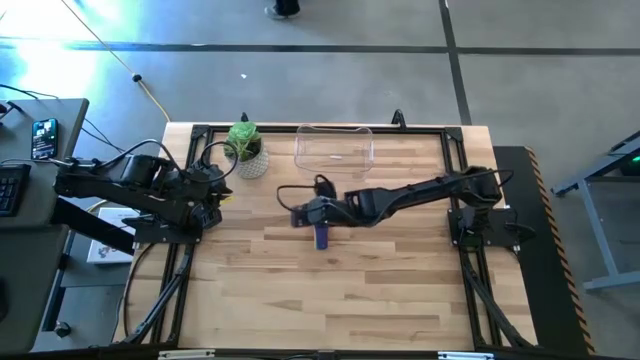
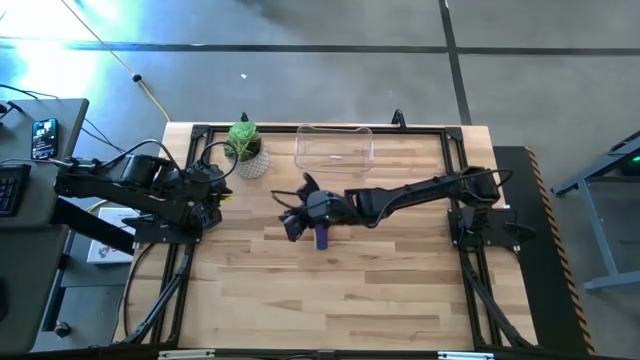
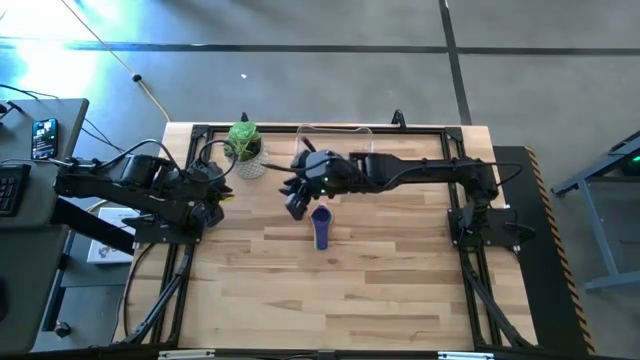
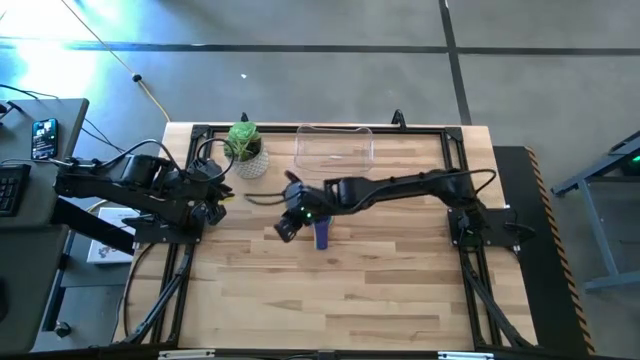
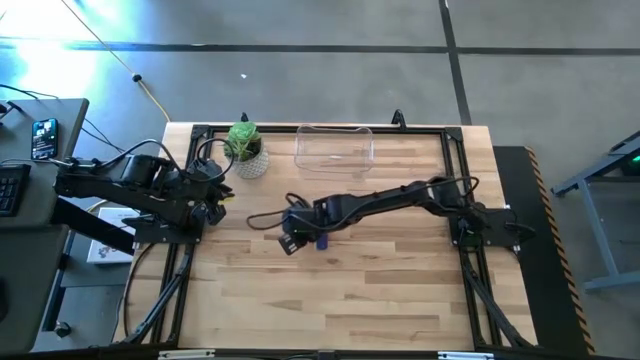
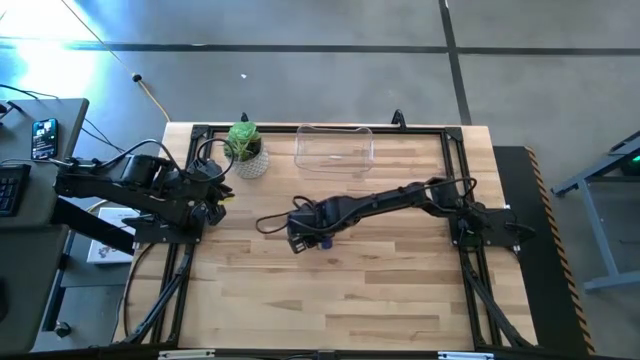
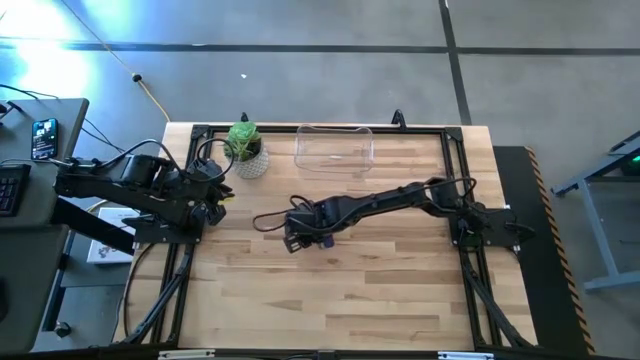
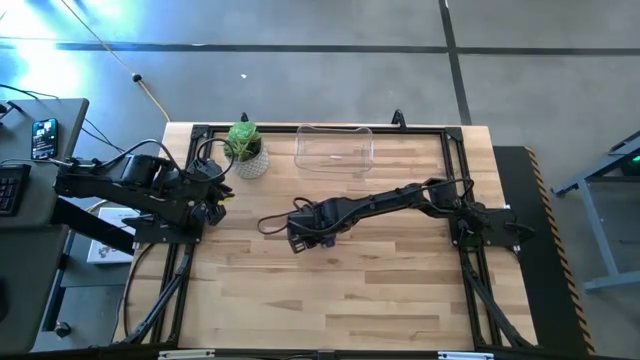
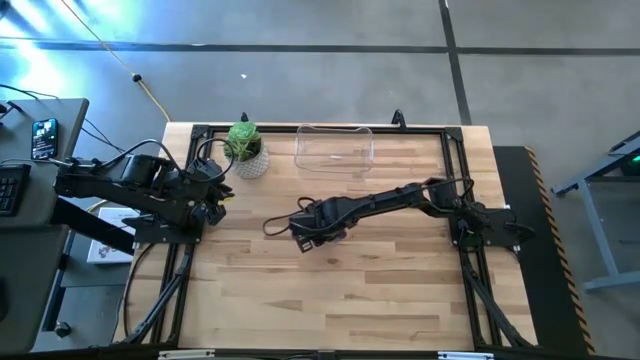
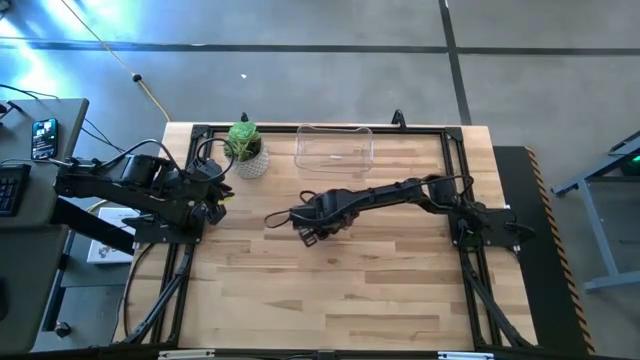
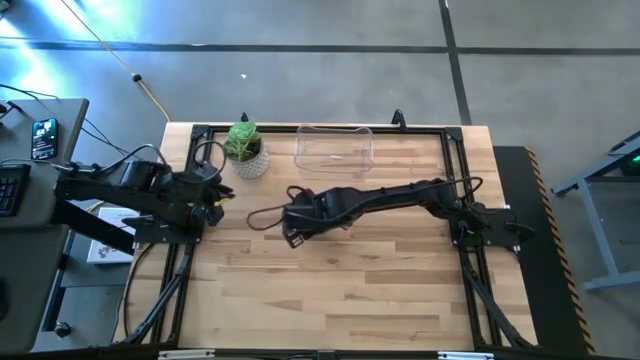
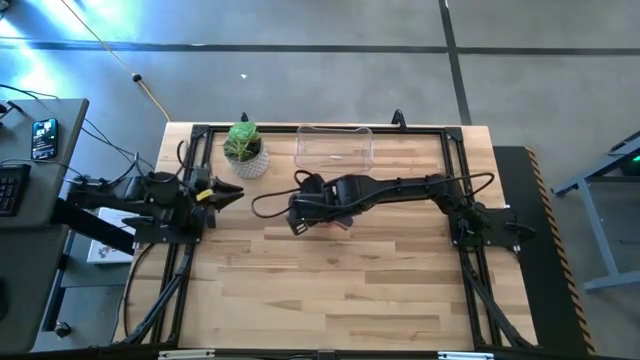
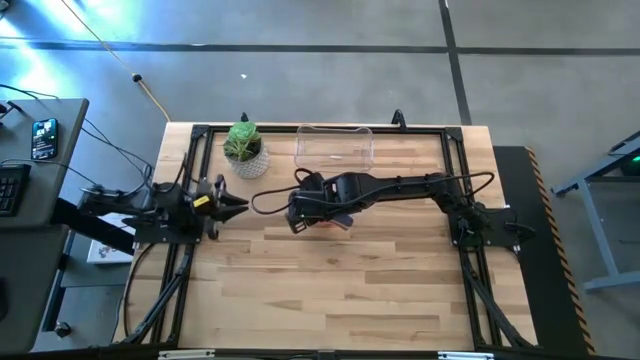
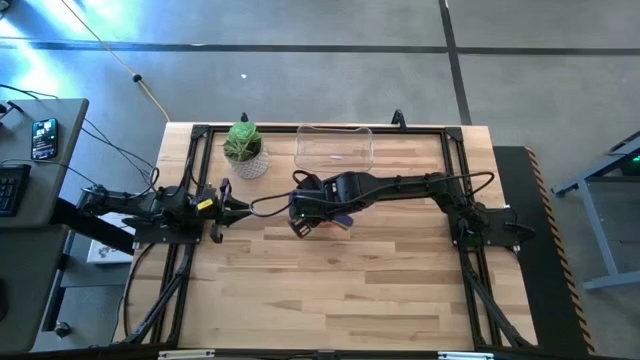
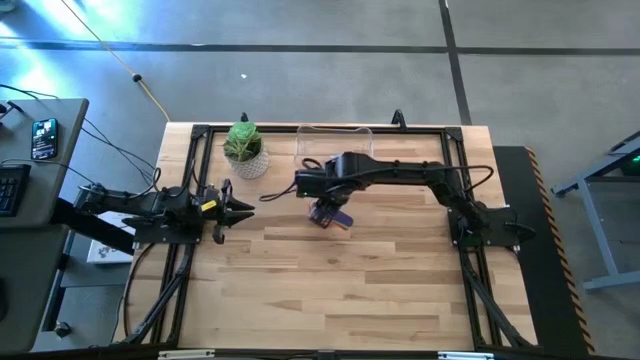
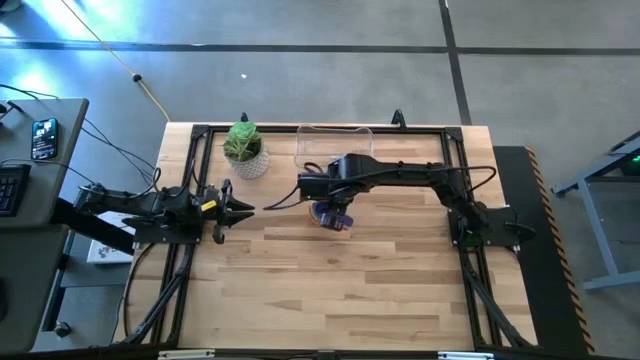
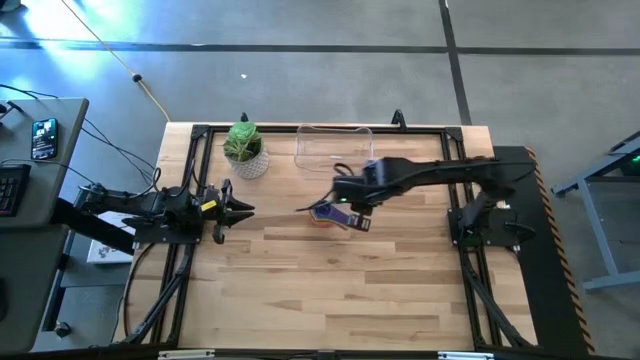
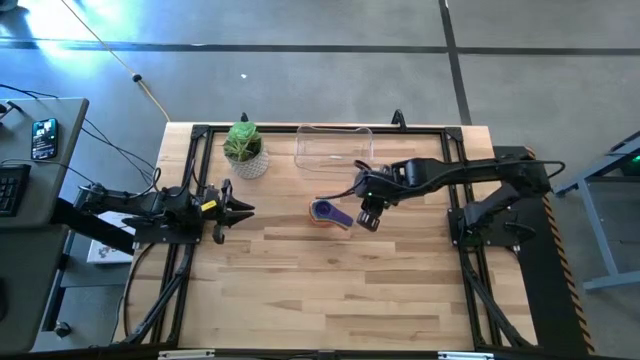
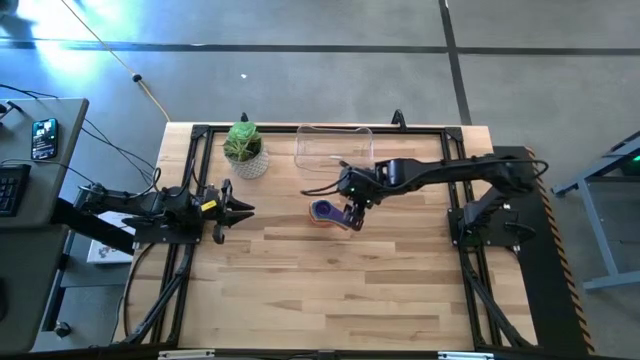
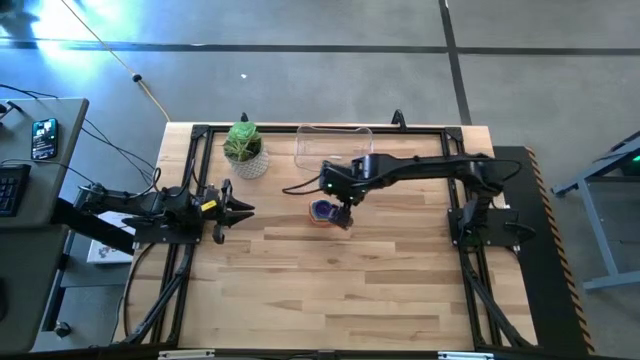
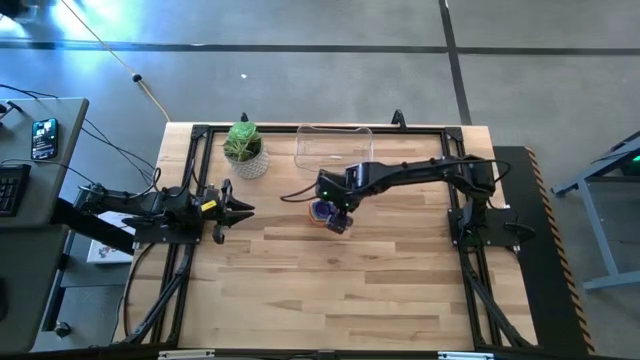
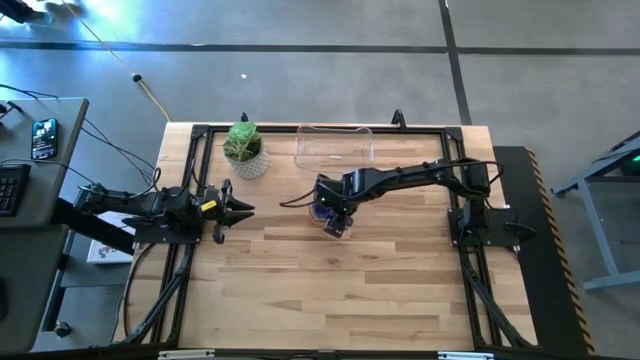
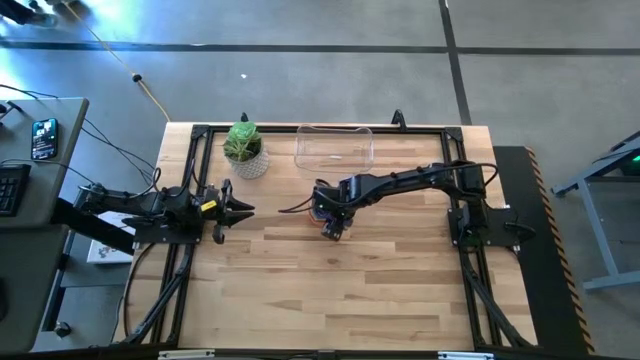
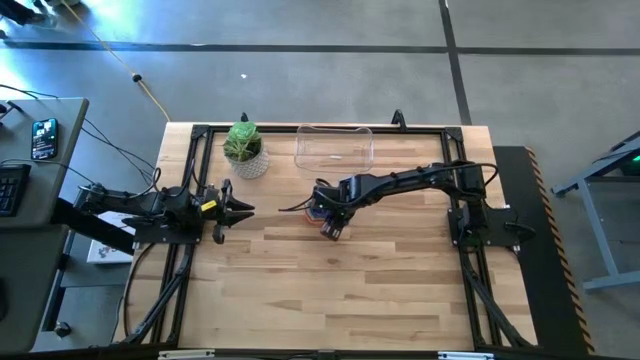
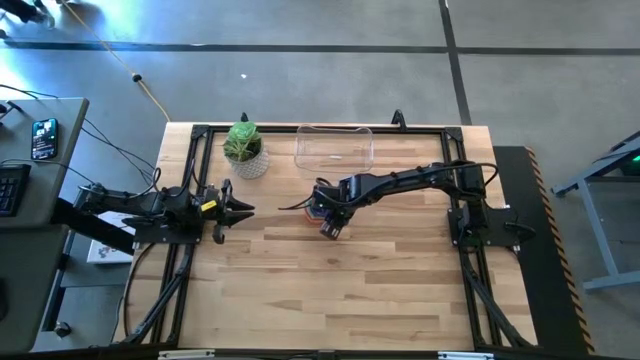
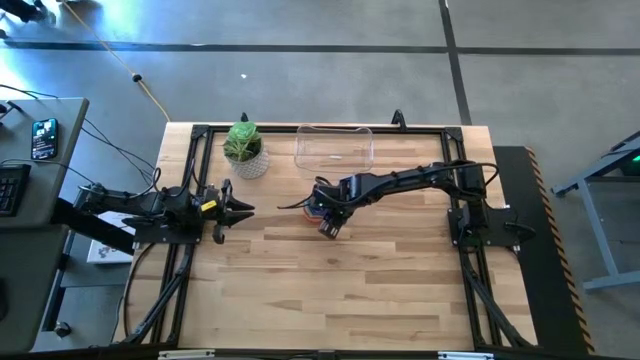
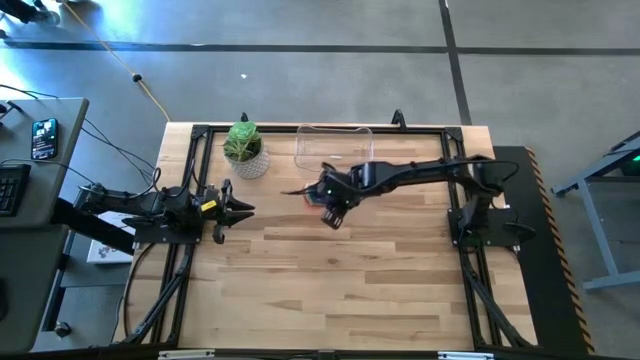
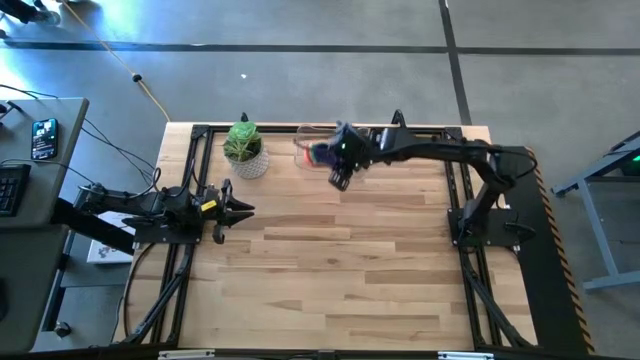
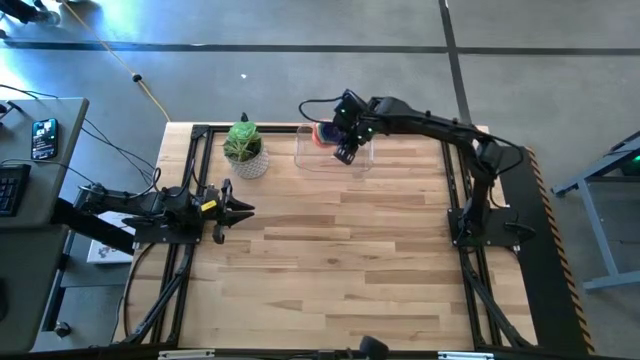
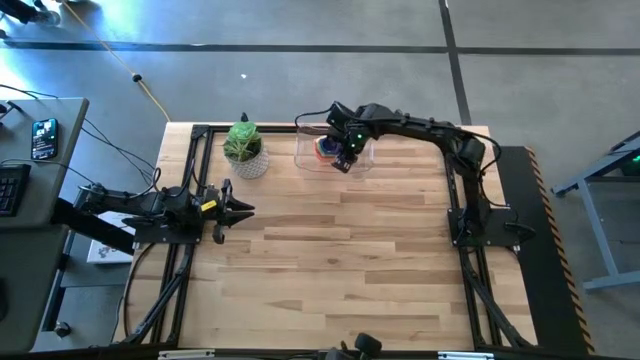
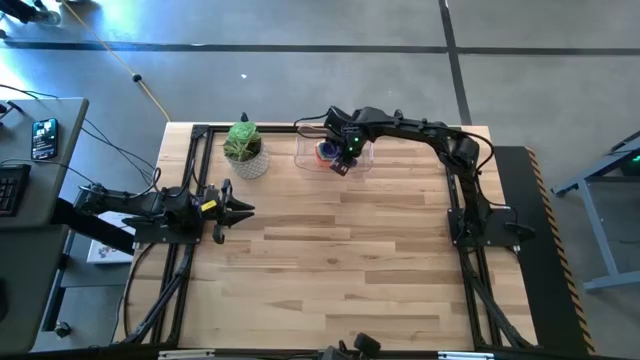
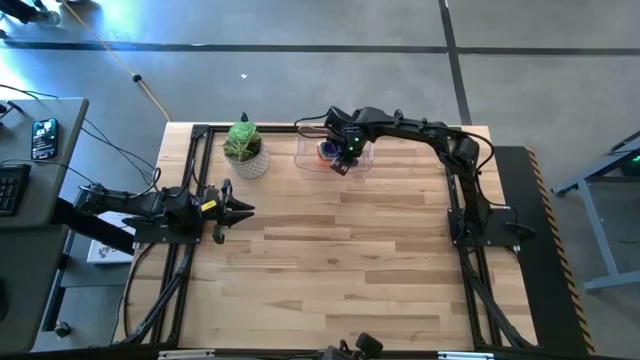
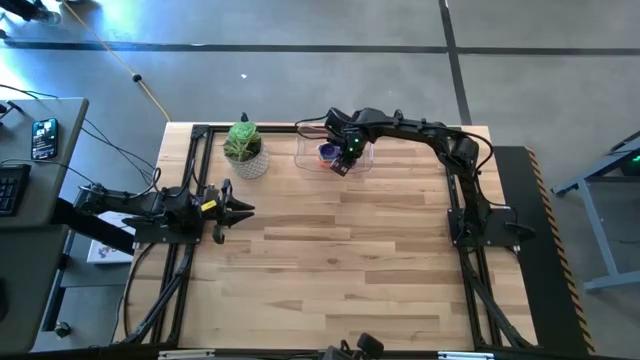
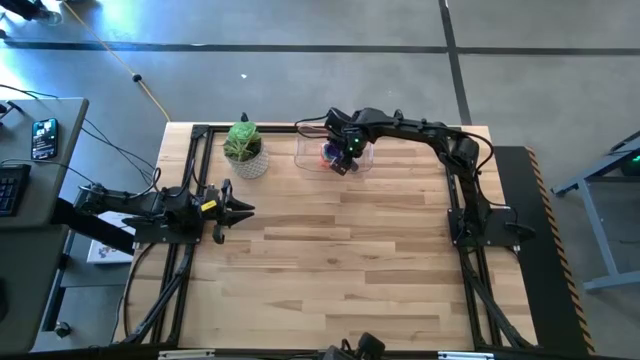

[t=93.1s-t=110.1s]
Task: Nest measuring cups in basket
Put the stacked measuring cups into the transparent bin

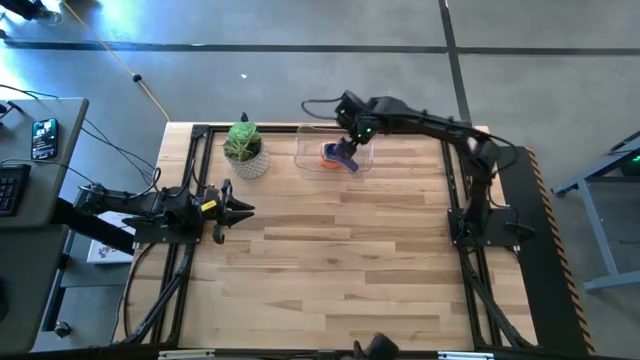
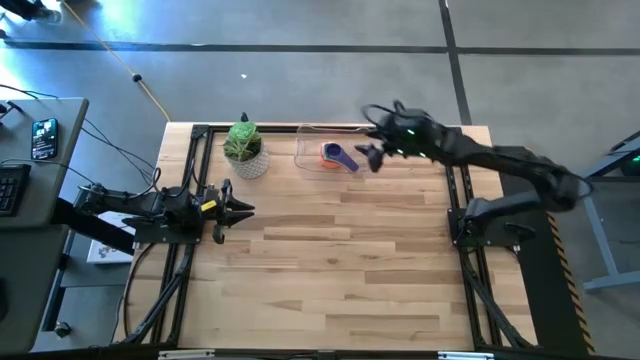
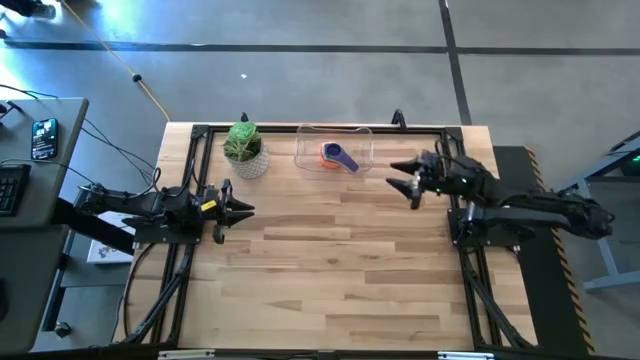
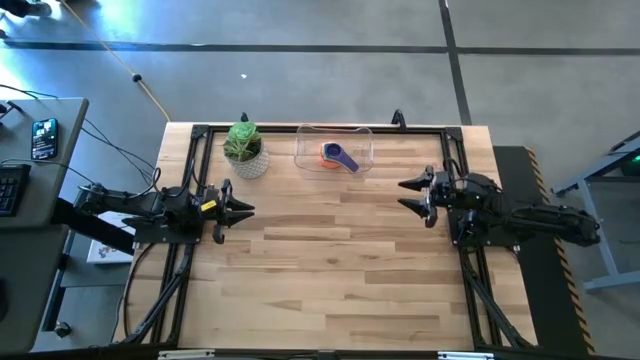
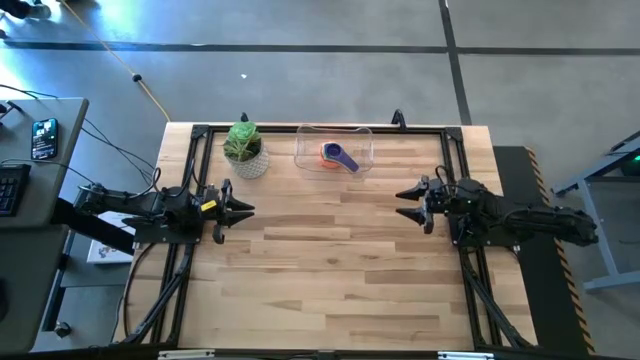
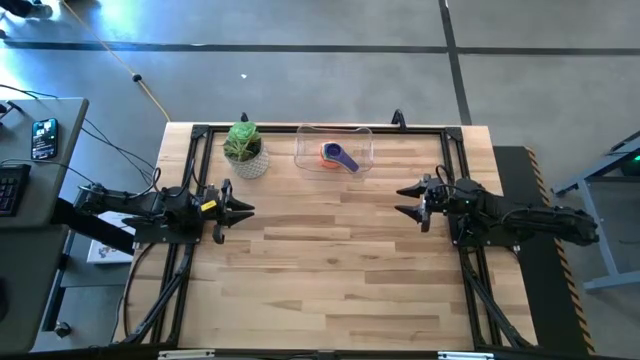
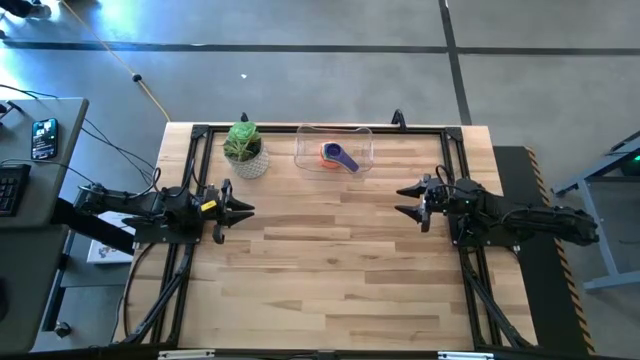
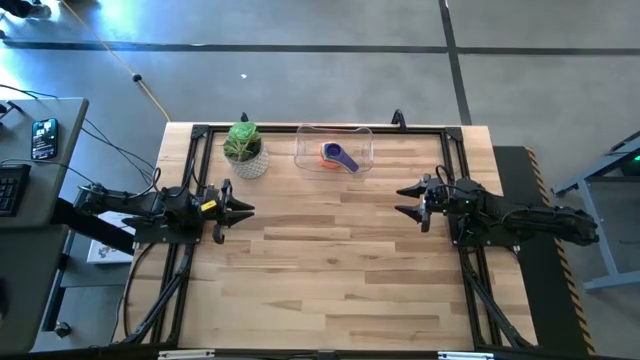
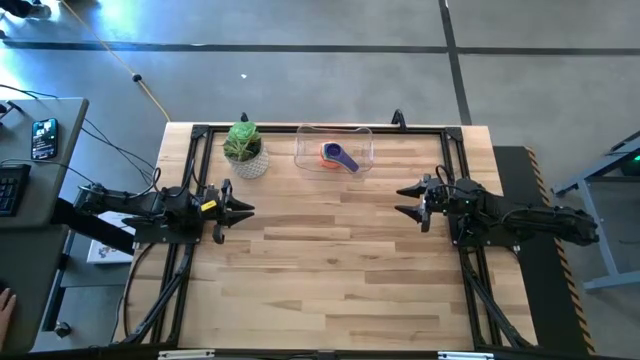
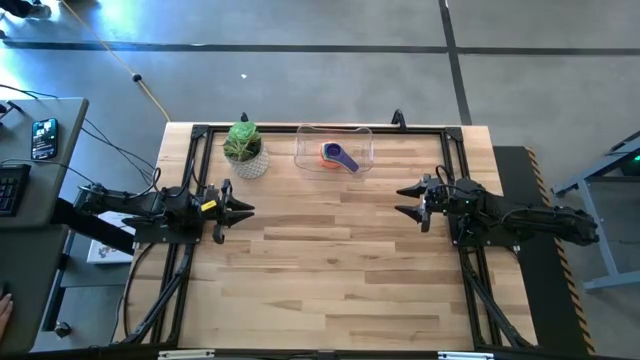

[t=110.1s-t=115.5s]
Return to Home Position

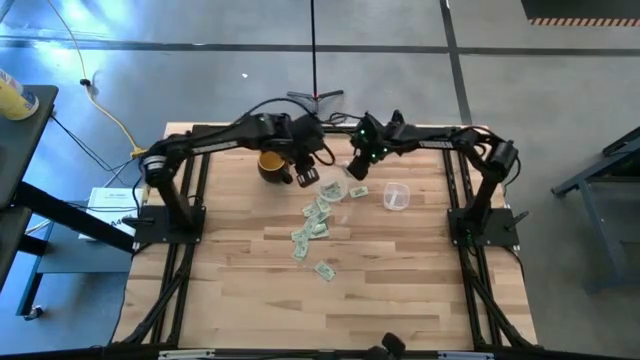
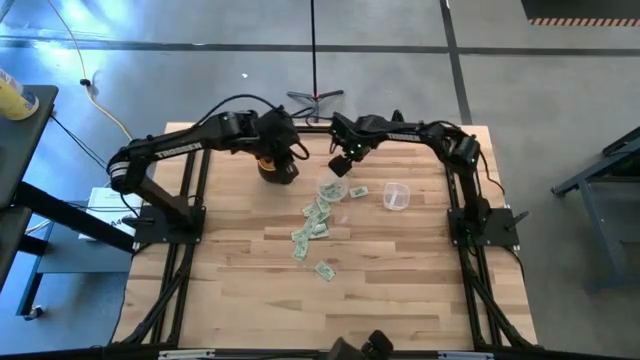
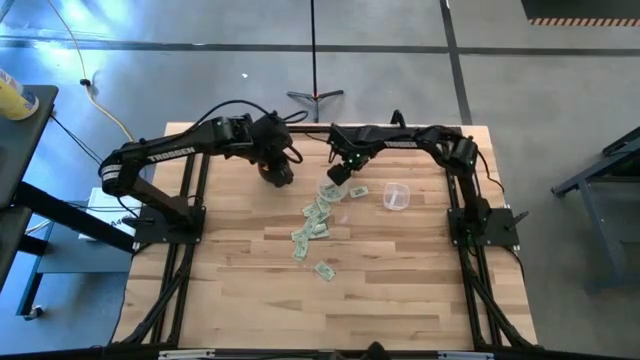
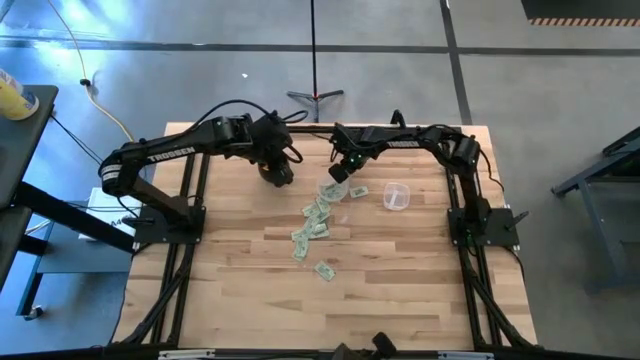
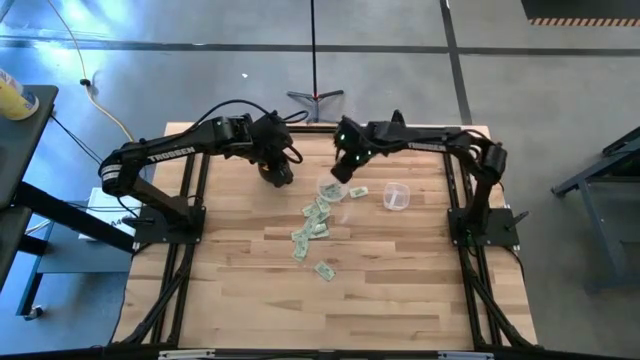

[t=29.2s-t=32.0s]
Task: Pick and place items into bin
Put the light green stevia packet into the left transparent bin
